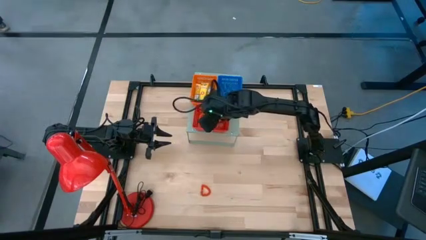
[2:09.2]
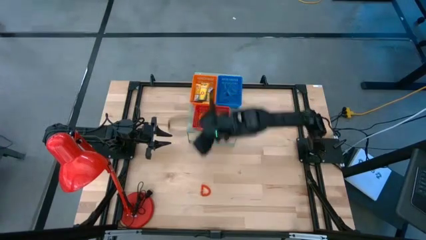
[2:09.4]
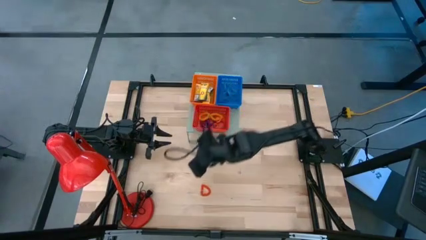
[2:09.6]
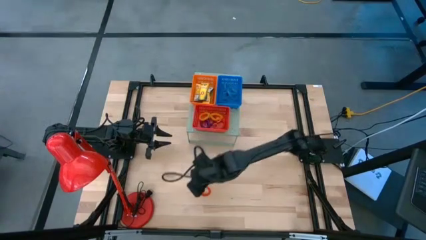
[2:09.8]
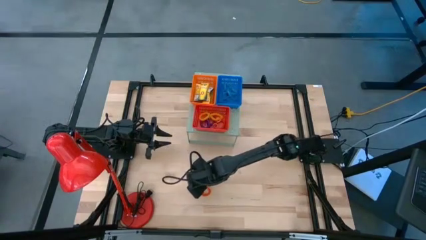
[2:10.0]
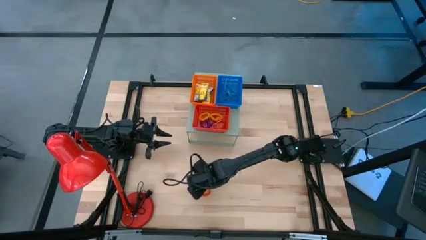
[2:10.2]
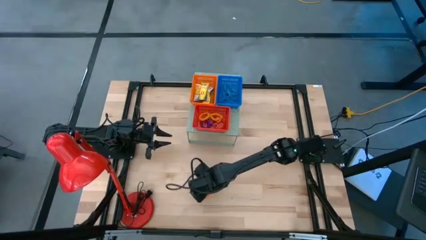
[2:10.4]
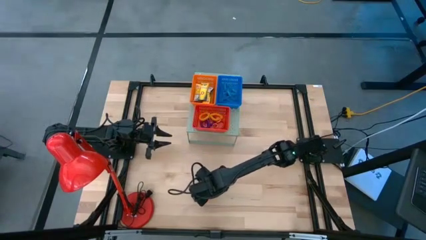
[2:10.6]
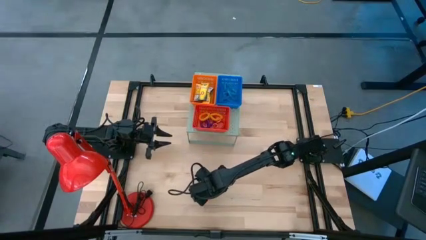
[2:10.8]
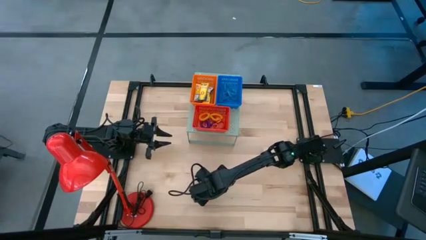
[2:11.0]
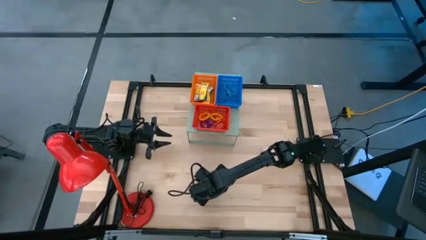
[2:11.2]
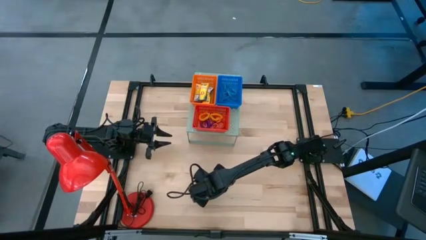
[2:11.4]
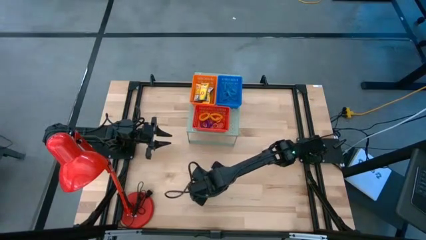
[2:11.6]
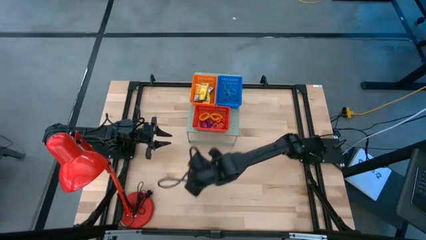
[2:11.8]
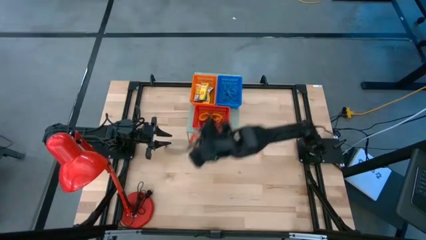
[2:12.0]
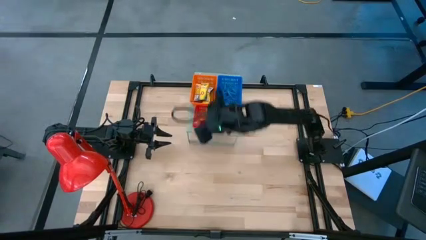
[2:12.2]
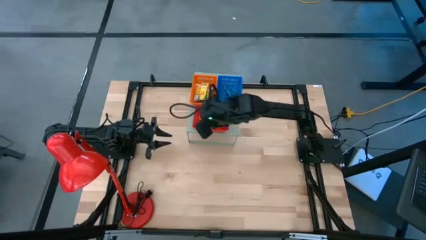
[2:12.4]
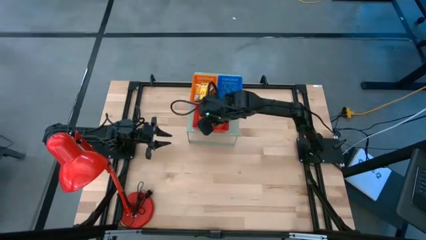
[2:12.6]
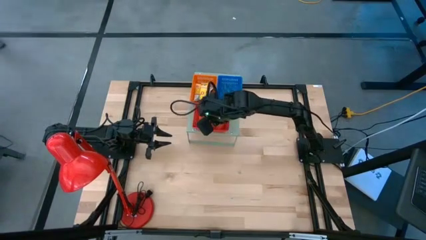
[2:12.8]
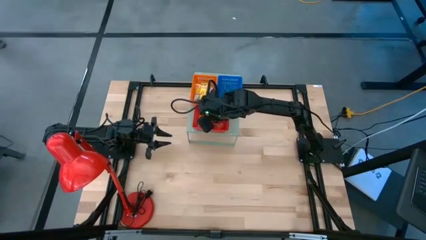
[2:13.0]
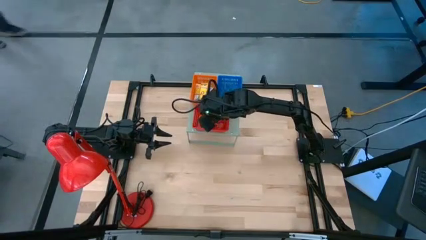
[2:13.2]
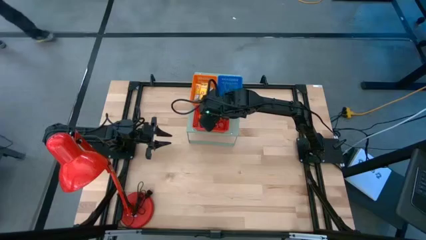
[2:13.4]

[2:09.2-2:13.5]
Task: Pick & Place Office Desk Supplies
Put the orange spring keychain into the red bin

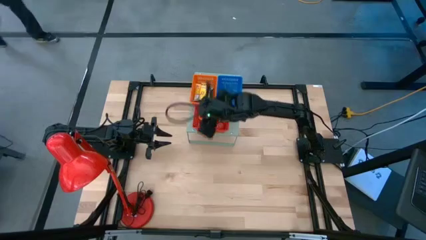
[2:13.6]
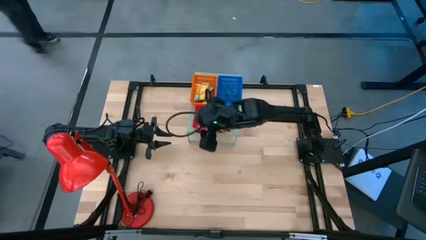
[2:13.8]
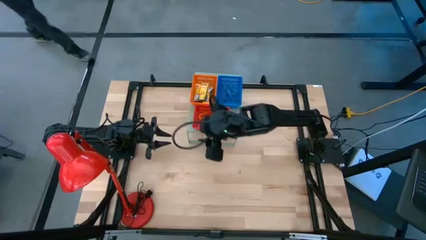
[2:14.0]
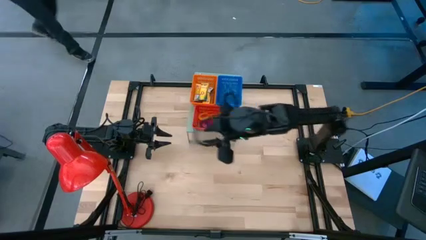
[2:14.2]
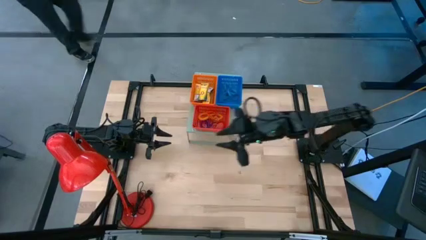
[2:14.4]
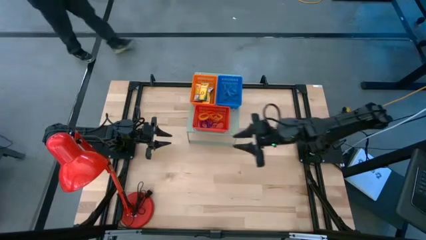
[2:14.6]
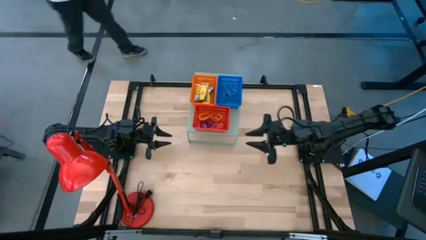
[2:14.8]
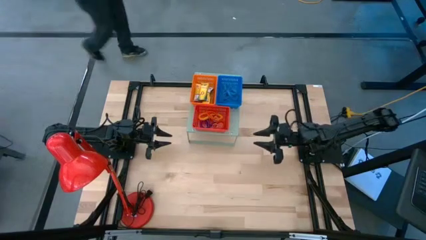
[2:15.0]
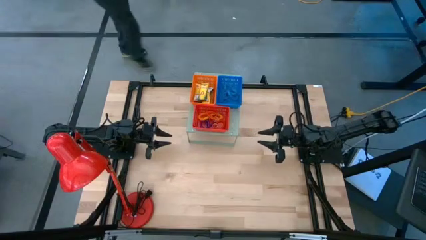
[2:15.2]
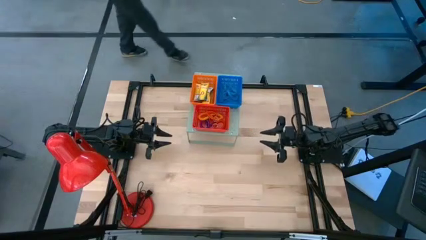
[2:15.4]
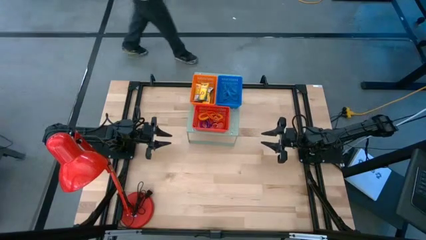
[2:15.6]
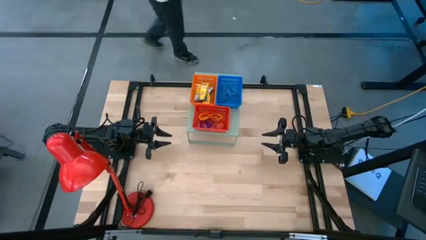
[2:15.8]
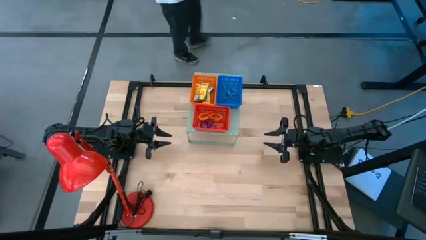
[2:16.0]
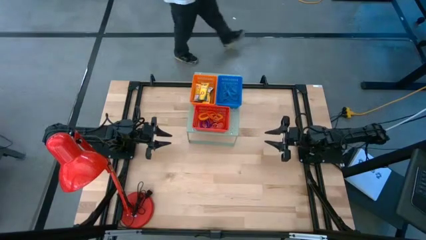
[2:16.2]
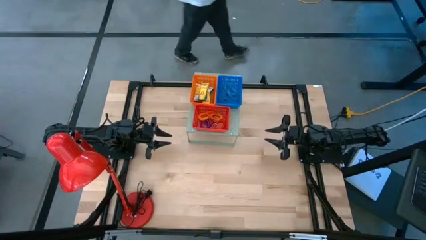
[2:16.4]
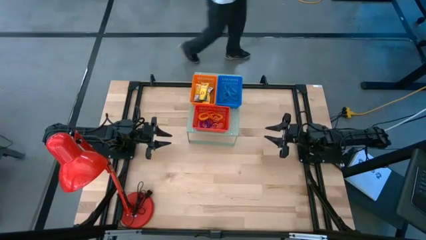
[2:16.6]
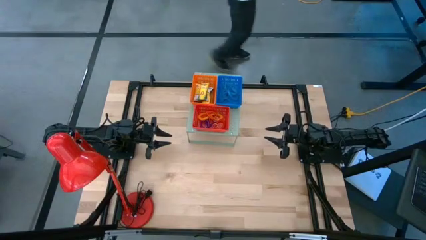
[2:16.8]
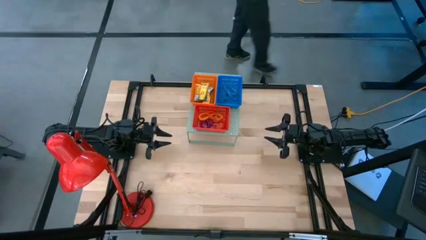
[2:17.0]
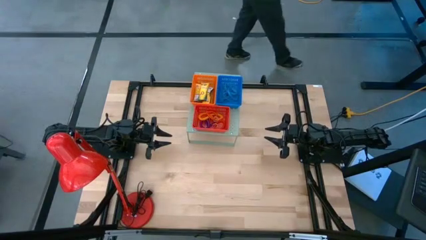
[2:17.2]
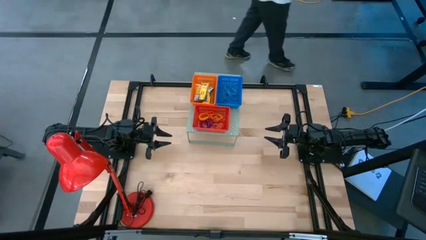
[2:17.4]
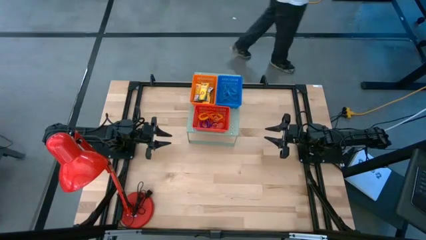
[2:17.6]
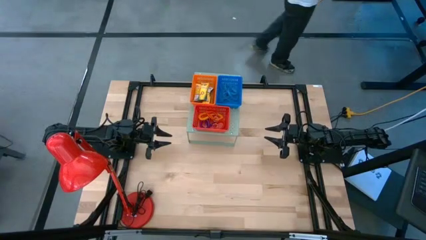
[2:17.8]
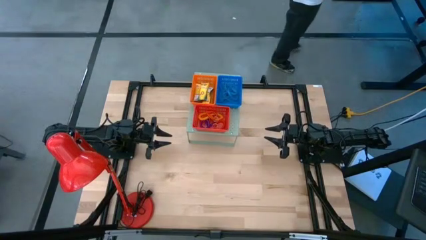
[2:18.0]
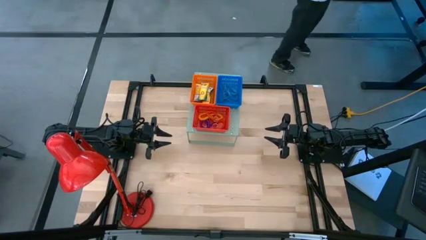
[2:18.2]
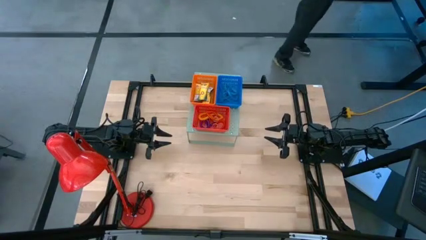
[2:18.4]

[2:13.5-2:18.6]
Return to Home Position

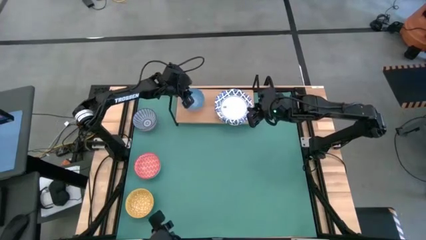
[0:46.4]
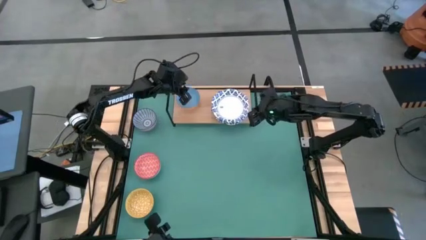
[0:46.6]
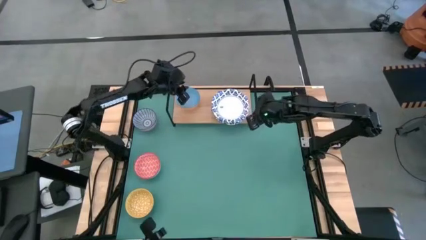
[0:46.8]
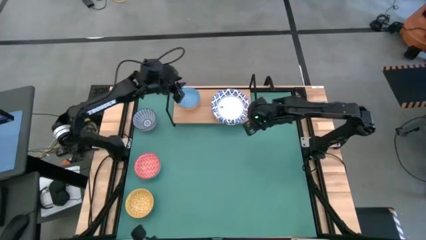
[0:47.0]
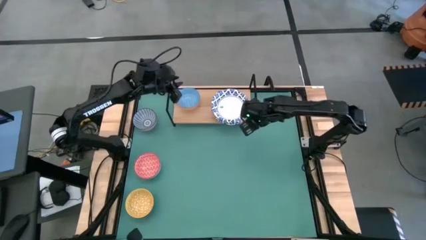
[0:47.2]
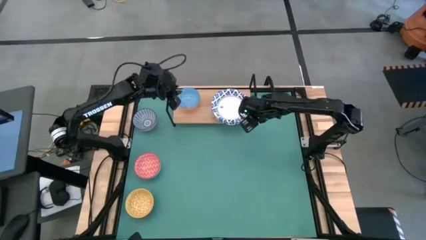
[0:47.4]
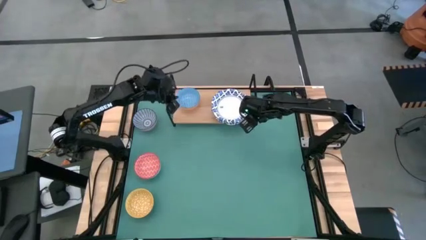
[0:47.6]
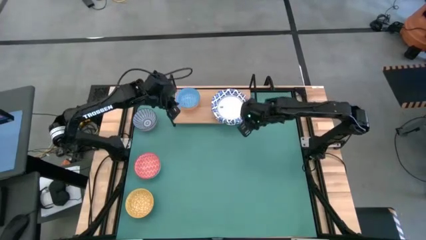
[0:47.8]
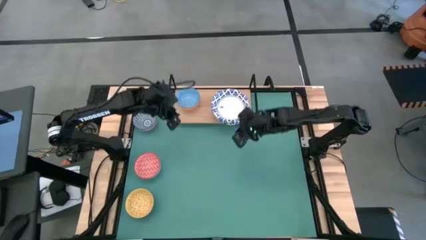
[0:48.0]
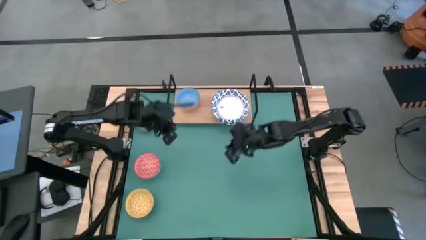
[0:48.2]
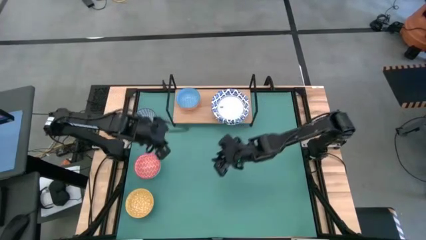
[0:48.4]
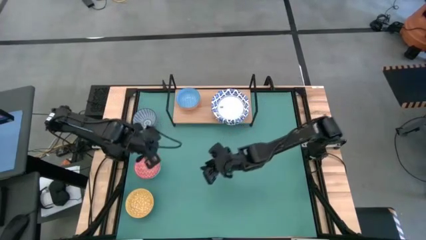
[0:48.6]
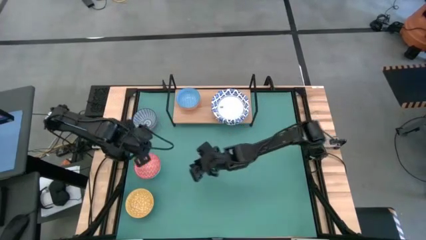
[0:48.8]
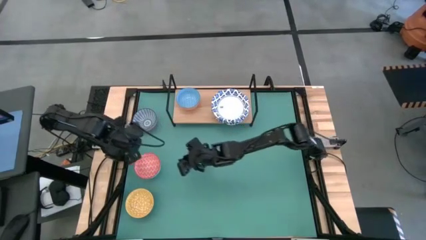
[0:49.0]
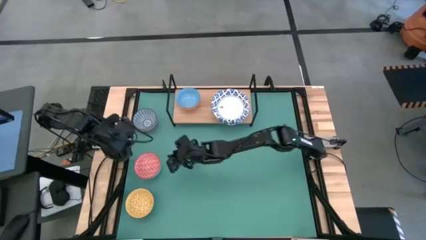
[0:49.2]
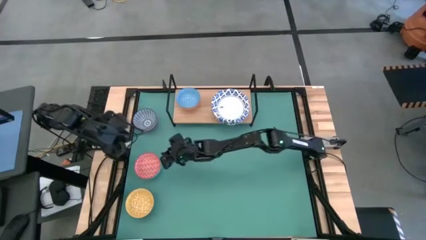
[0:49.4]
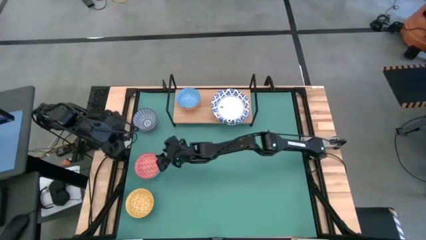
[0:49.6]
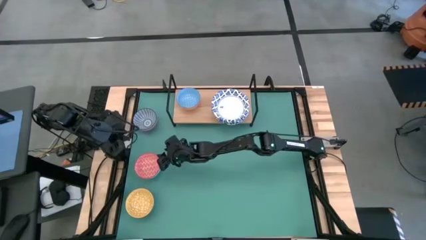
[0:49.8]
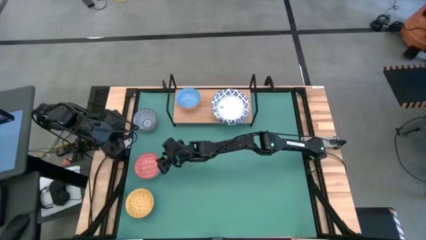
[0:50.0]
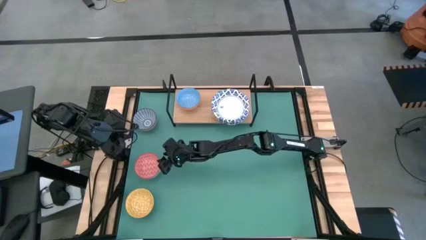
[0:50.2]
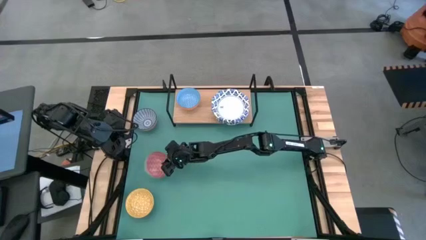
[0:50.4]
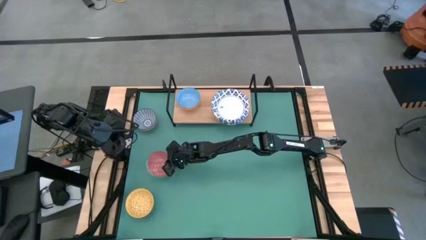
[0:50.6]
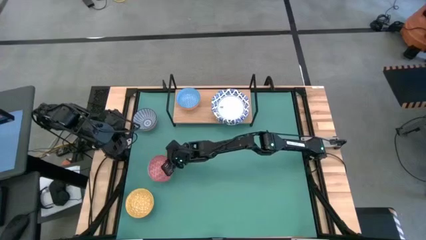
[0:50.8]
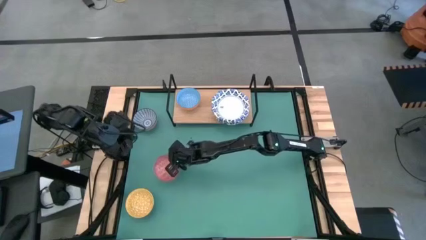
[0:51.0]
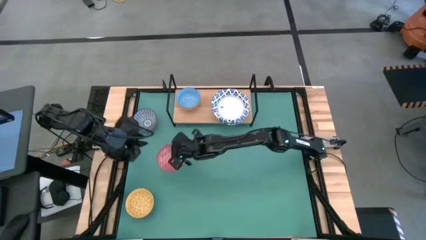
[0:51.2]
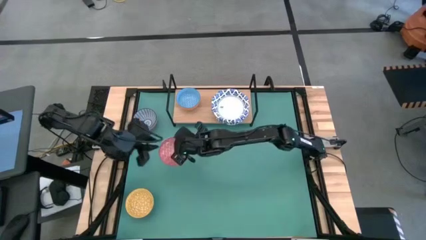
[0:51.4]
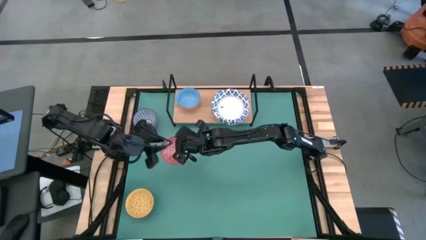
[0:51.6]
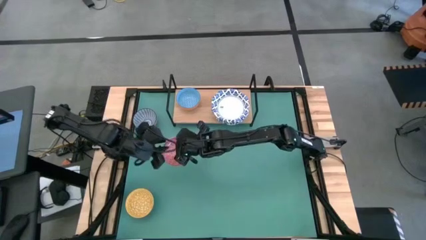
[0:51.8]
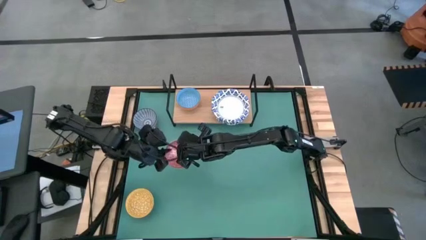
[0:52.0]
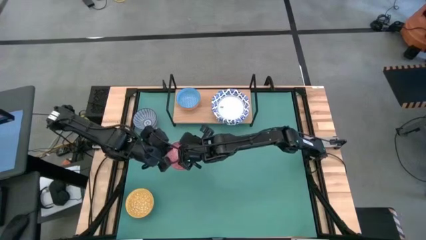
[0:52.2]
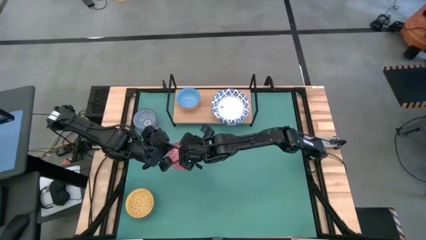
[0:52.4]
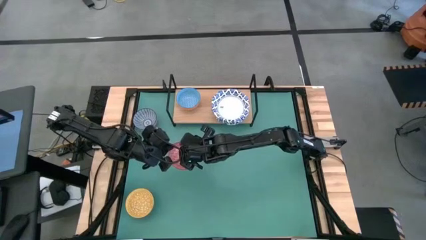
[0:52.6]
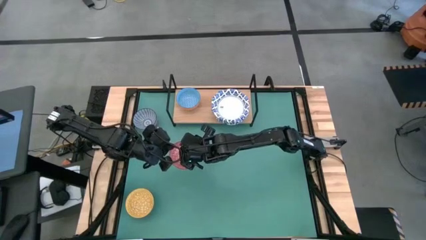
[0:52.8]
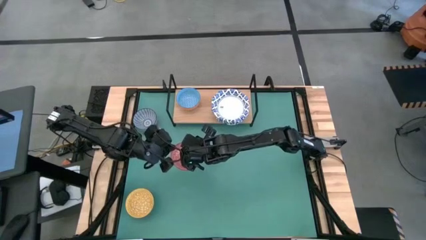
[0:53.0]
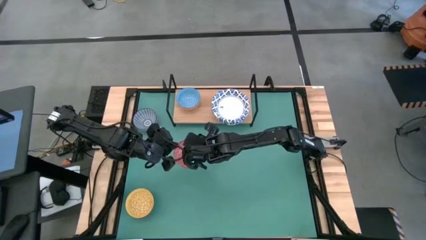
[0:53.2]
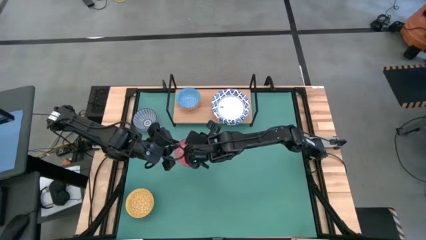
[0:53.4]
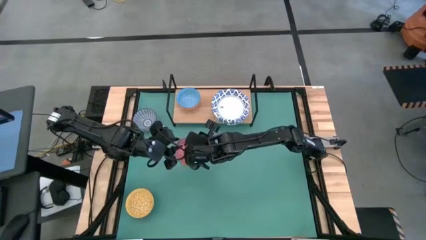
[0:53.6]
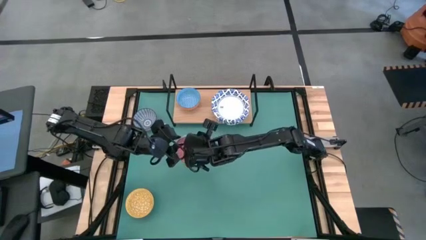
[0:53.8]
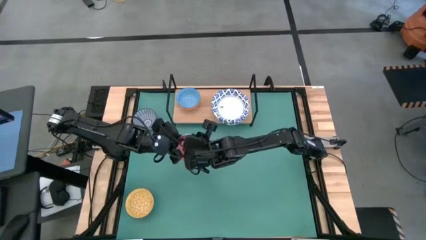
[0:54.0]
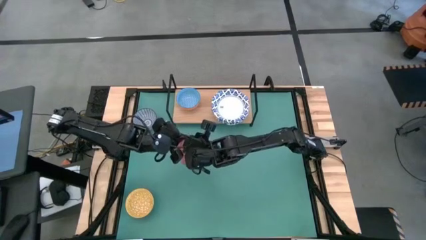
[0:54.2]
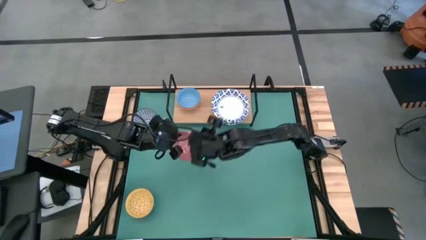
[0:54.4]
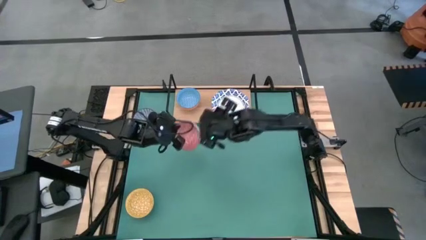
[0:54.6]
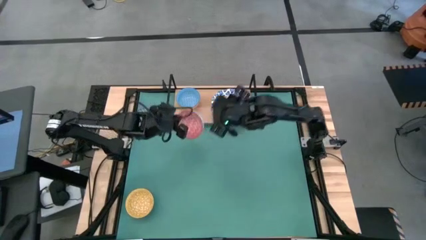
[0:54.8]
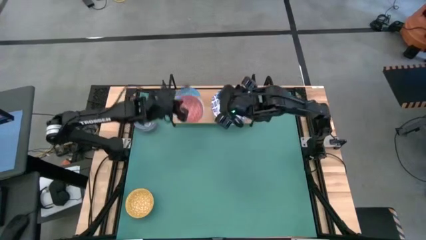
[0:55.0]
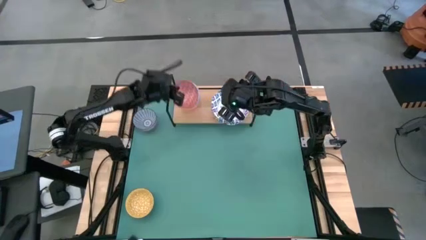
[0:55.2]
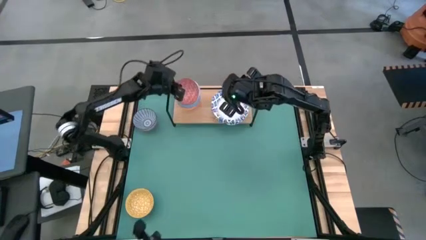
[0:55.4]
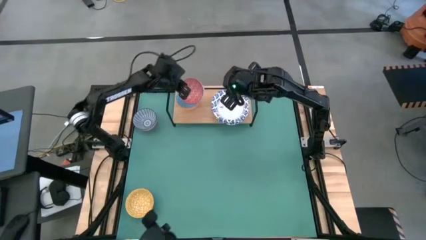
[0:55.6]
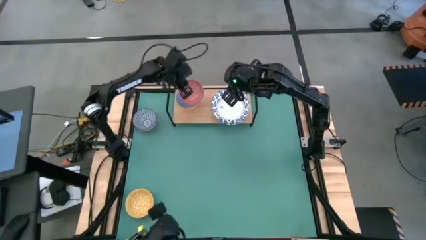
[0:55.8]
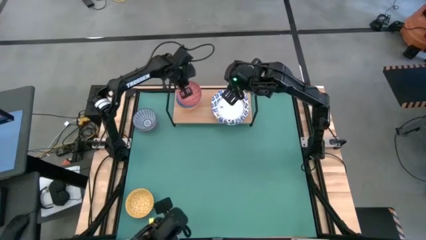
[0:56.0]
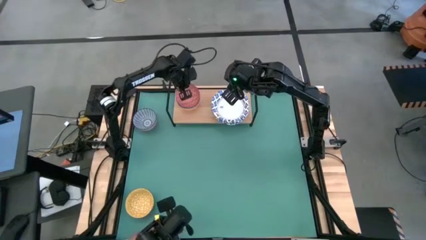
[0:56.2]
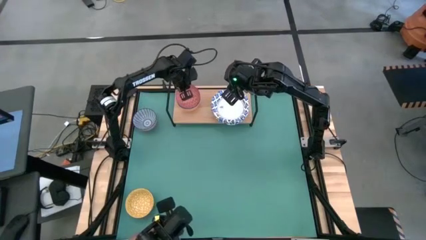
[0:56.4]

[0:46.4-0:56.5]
Task: Place and stack bowls onto a shelf
Stack the red bowl on top of the blue bowl on the shelf
